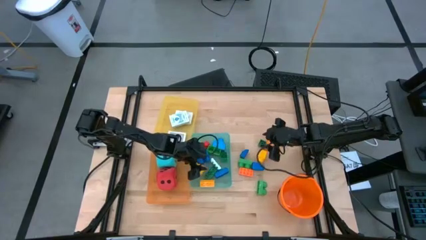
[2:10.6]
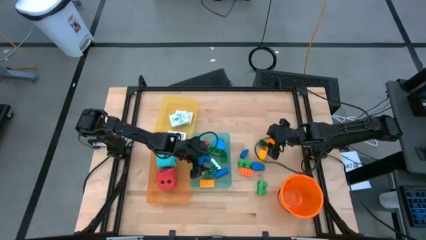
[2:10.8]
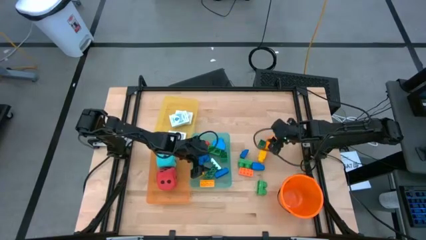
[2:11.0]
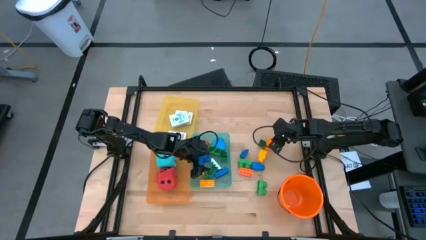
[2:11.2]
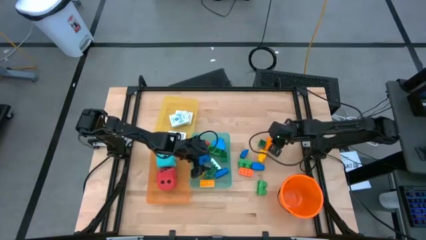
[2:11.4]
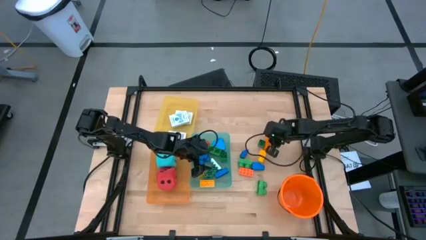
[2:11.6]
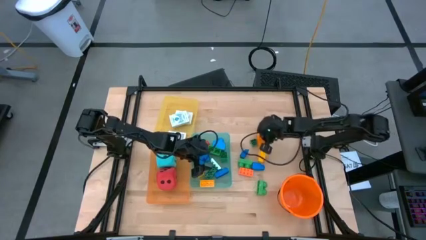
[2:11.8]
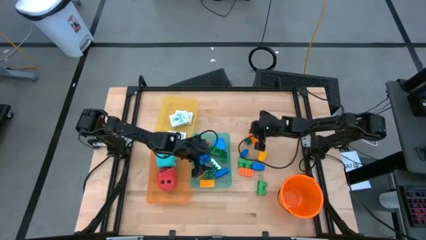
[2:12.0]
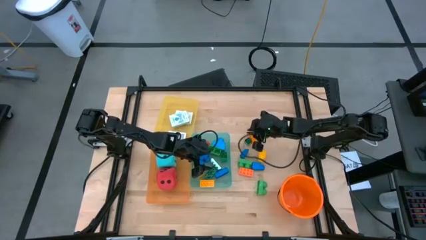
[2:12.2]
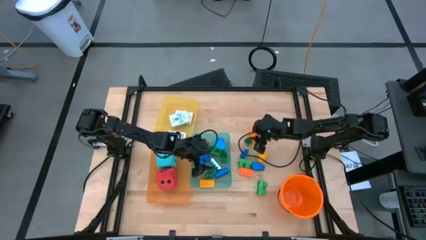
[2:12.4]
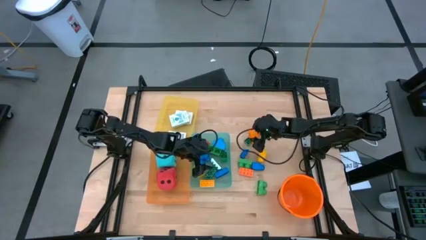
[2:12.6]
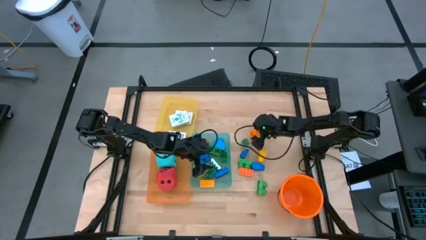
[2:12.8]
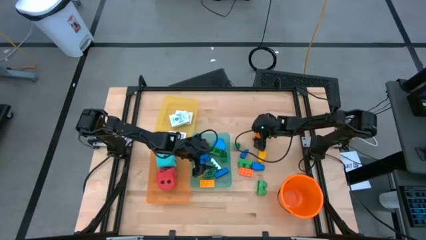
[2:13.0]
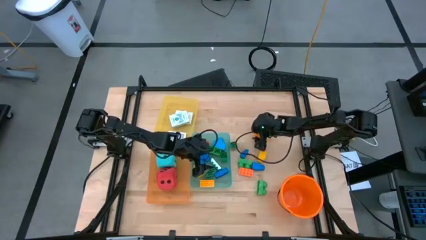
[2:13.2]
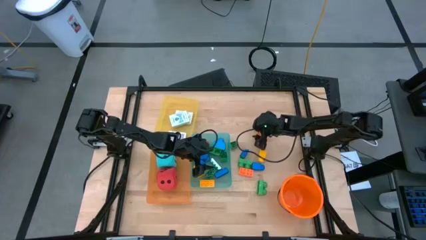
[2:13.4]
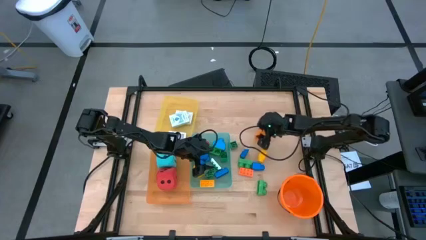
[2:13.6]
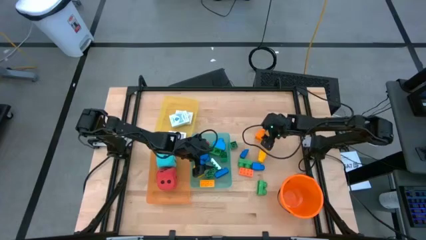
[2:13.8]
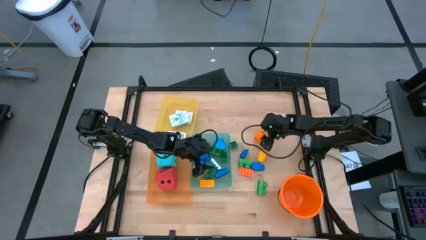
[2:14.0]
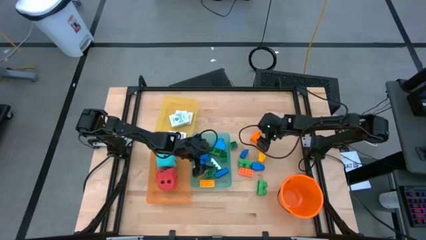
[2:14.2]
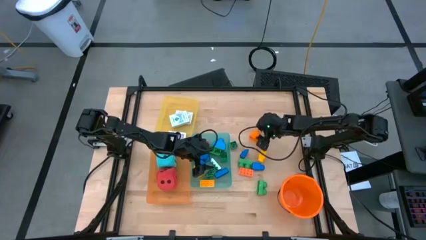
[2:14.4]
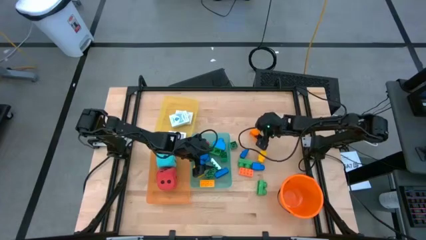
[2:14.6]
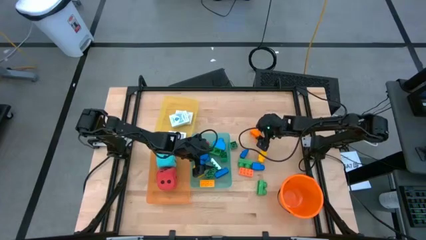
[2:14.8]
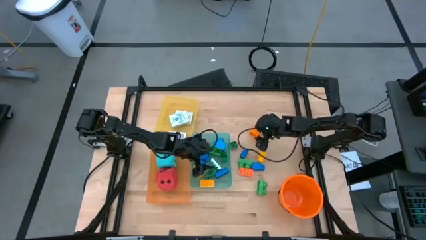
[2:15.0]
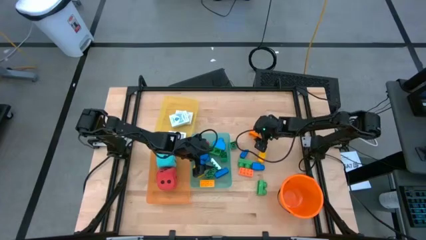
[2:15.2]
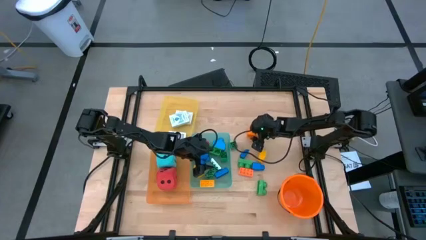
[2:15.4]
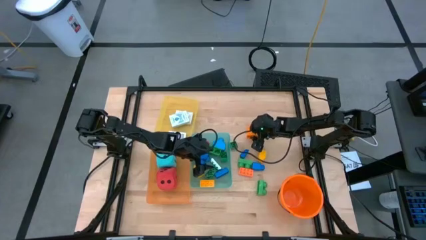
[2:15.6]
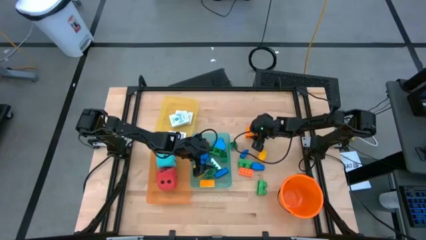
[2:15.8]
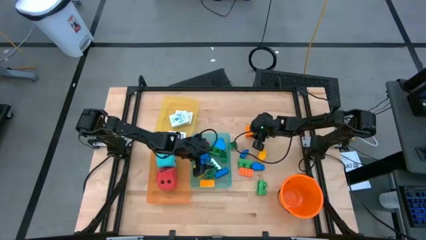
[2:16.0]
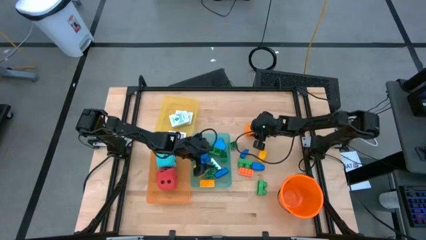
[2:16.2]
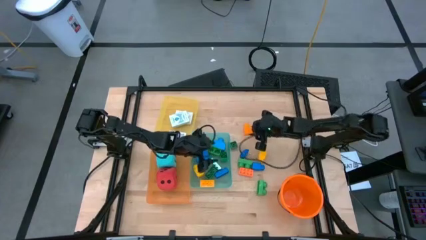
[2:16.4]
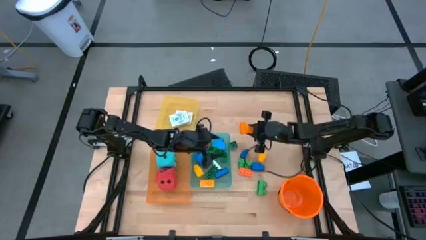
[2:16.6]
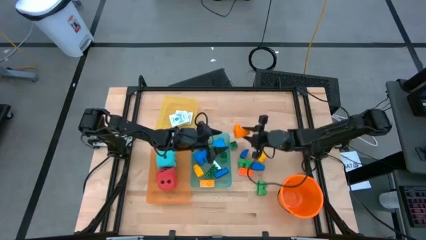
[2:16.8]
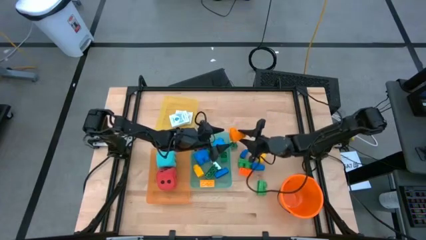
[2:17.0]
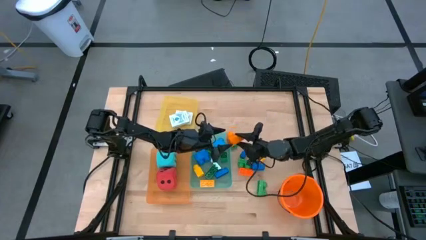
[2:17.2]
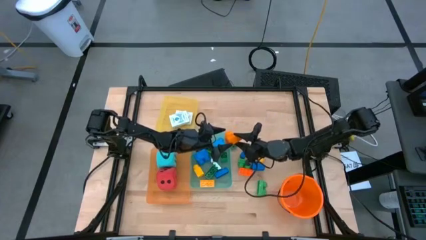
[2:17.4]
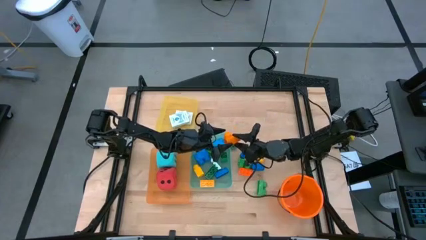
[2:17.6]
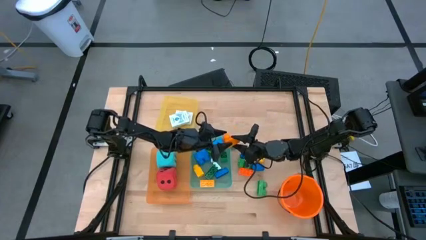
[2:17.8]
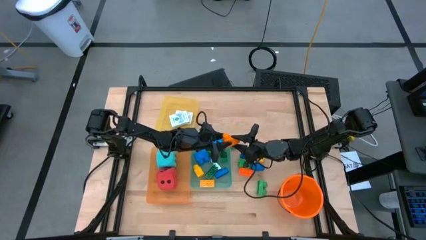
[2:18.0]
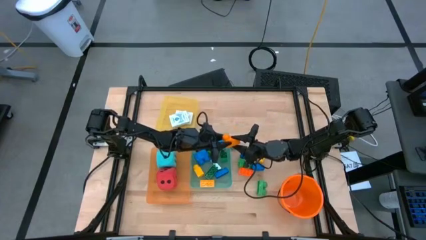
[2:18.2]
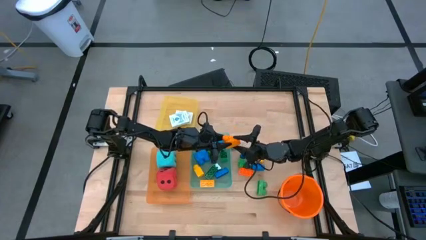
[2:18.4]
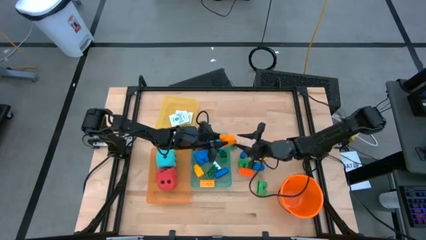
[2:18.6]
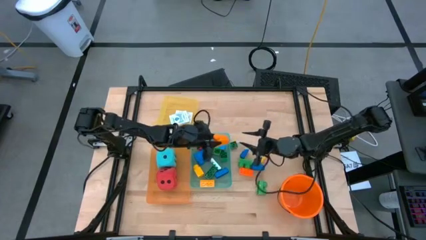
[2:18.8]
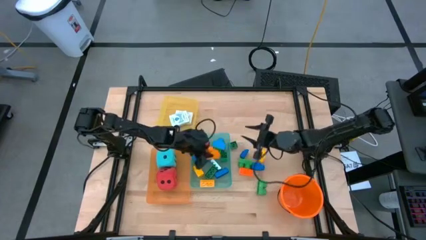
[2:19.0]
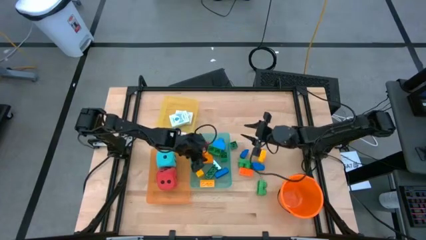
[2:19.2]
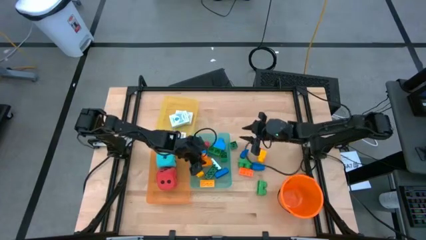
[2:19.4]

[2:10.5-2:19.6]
Task: Pick & Place Toys
Put the yellow game piece into the green bin

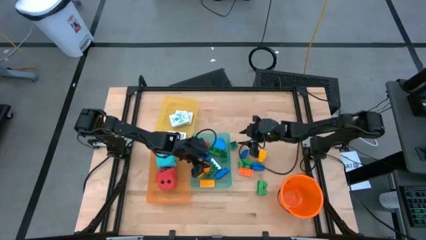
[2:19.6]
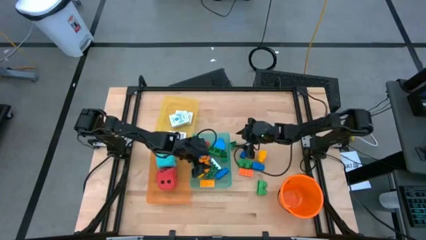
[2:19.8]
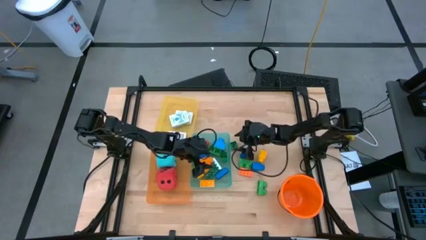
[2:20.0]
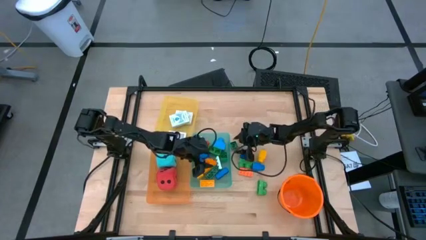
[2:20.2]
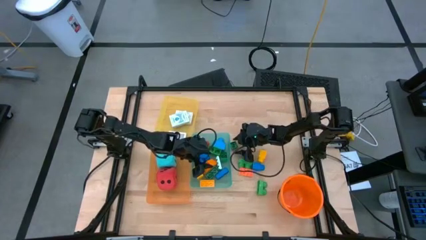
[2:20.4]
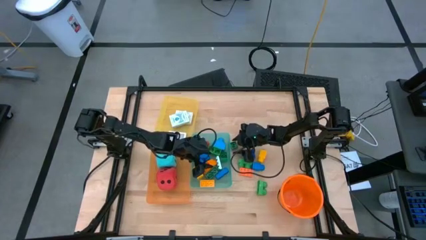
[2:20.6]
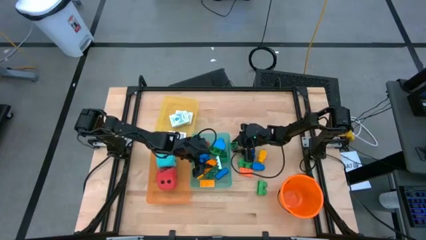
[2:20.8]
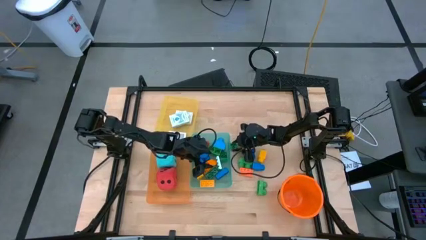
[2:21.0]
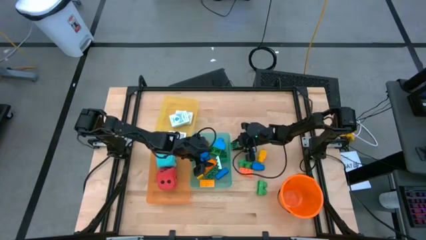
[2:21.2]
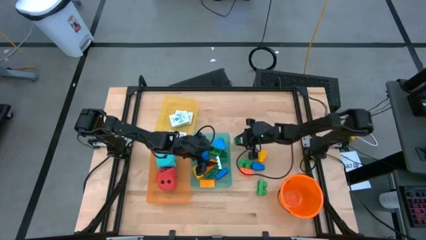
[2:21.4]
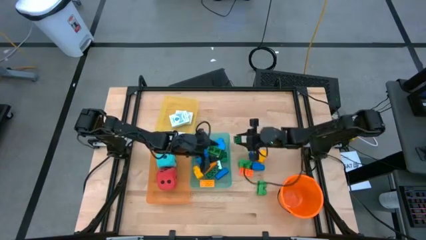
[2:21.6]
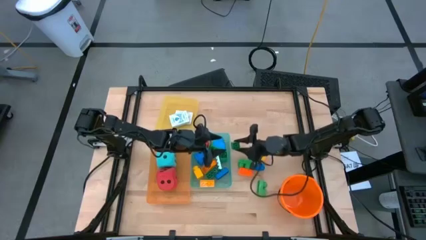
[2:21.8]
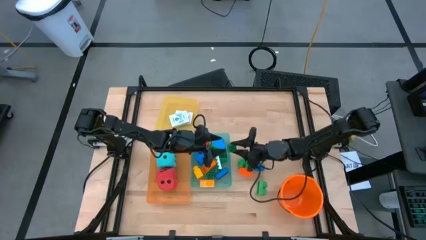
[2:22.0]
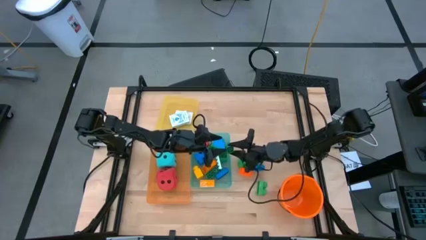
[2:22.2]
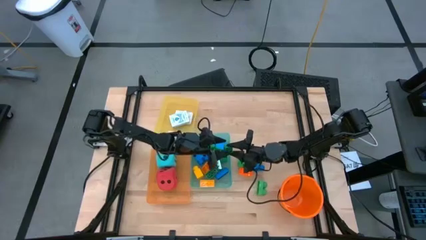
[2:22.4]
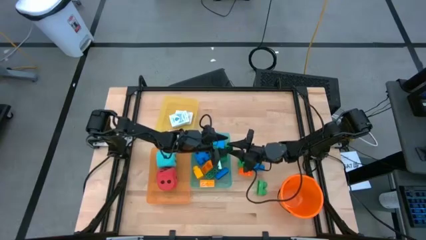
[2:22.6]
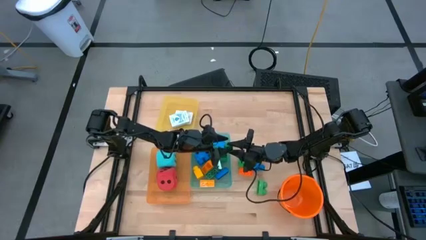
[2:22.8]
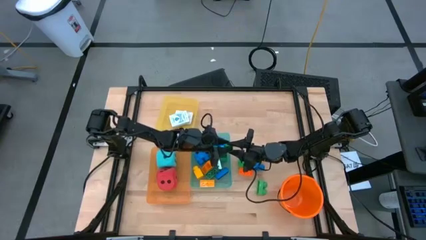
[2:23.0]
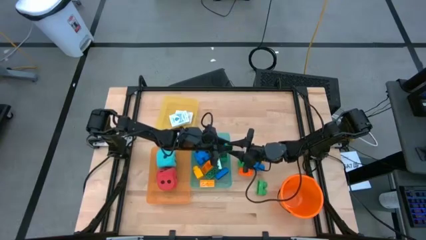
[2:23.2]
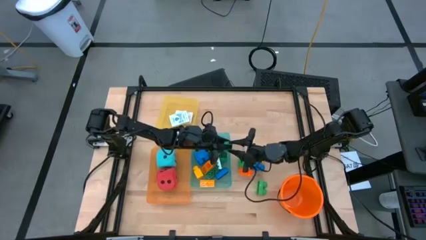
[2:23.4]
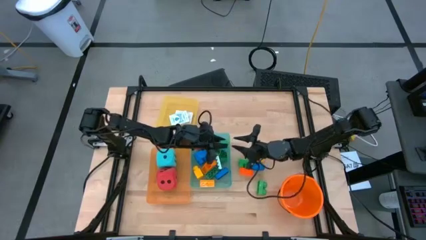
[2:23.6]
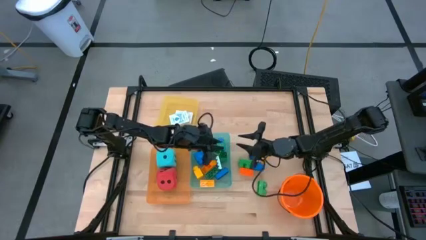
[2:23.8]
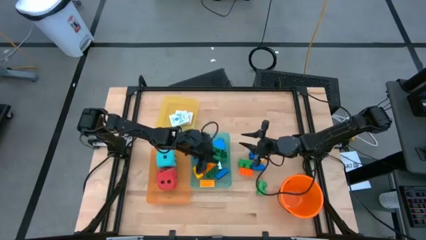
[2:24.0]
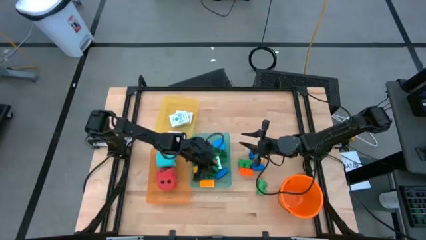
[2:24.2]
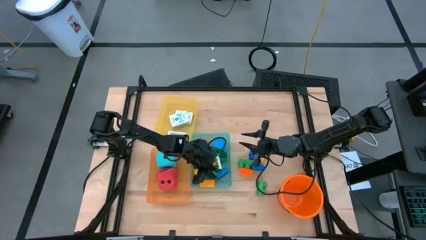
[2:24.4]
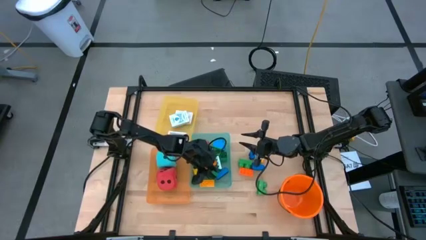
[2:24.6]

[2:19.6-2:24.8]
Put the green game piece into the green bin

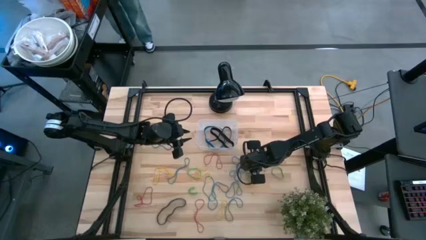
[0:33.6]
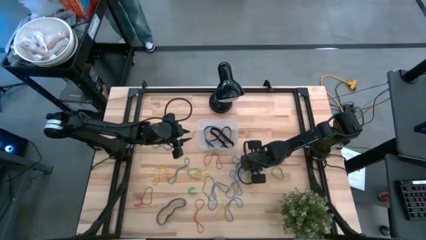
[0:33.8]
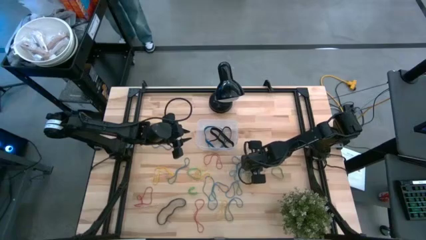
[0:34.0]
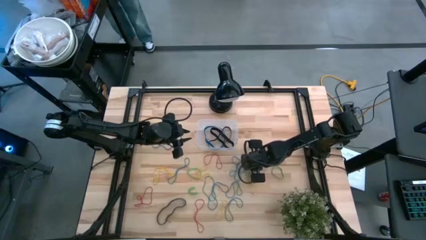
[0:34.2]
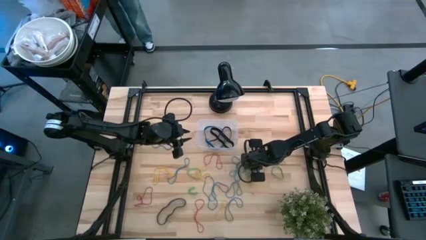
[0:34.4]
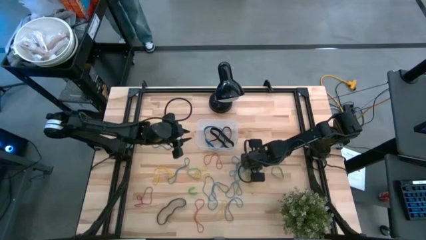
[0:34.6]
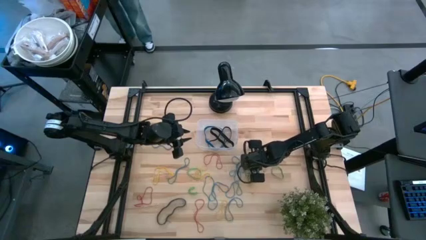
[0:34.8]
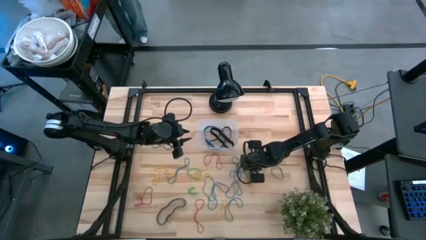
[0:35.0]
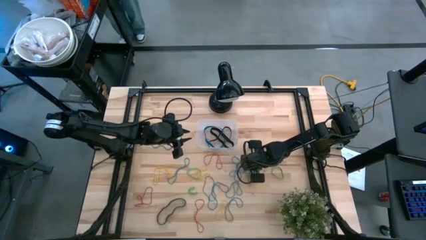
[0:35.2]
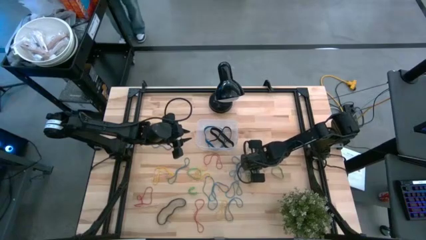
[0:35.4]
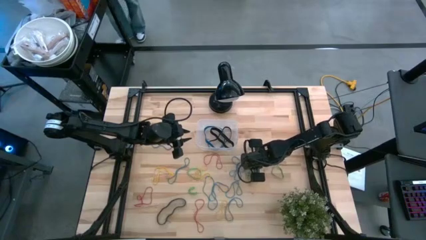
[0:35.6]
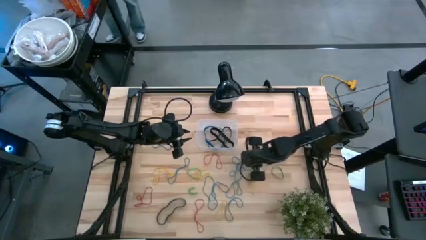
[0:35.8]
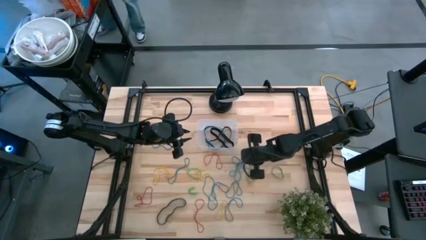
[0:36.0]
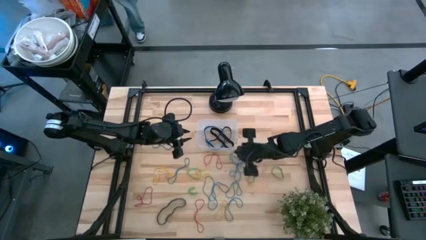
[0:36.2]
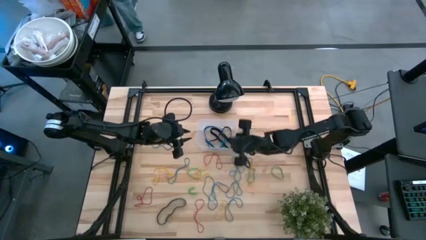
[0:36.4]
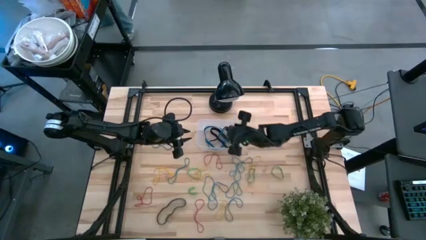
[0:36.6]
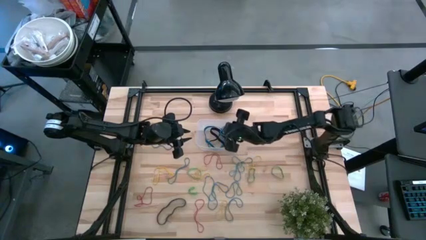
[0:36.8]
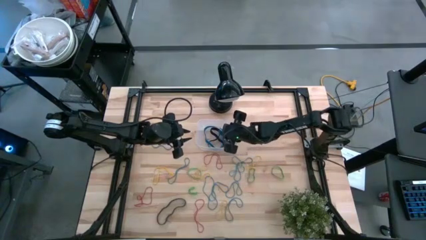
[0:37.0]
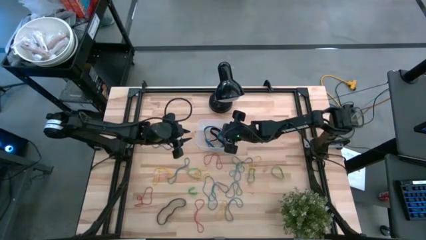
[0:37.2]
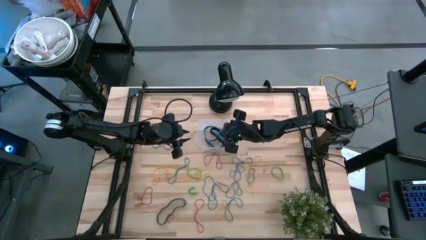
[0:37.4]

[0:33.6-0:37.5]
Task: Pick and place rubber bands into bin
Put the blue rubber band into the transparent bin
